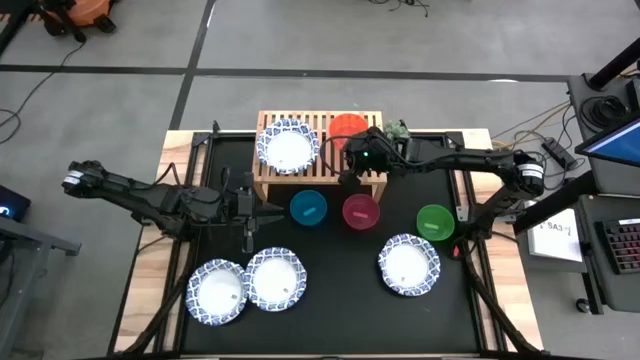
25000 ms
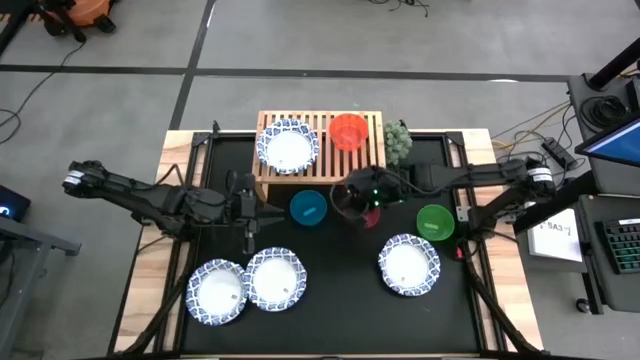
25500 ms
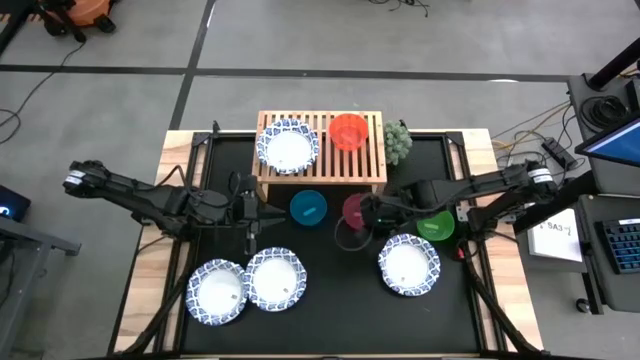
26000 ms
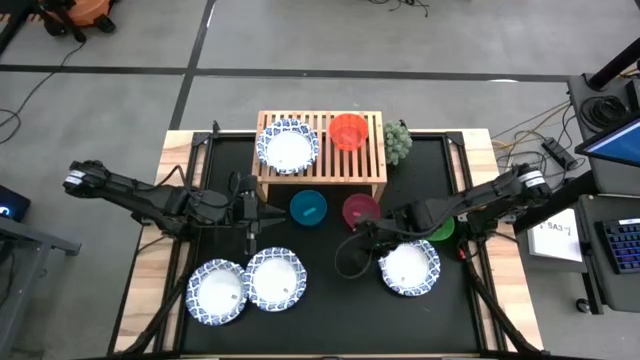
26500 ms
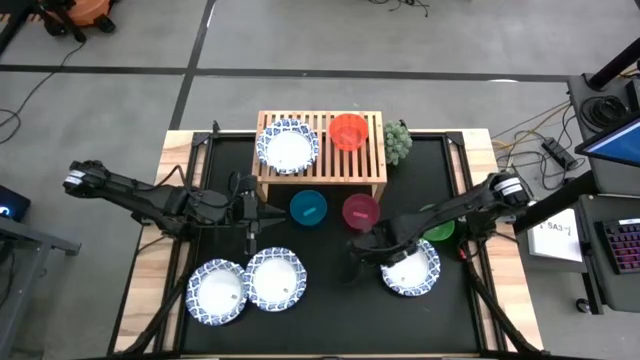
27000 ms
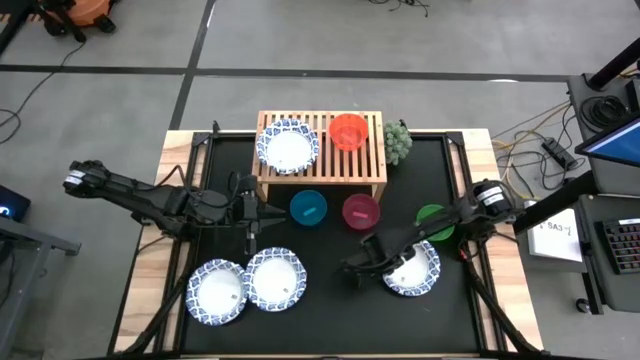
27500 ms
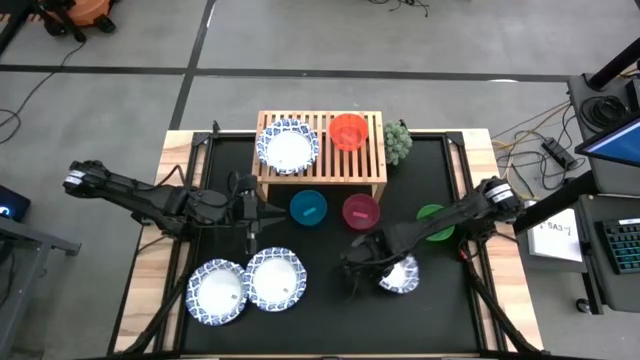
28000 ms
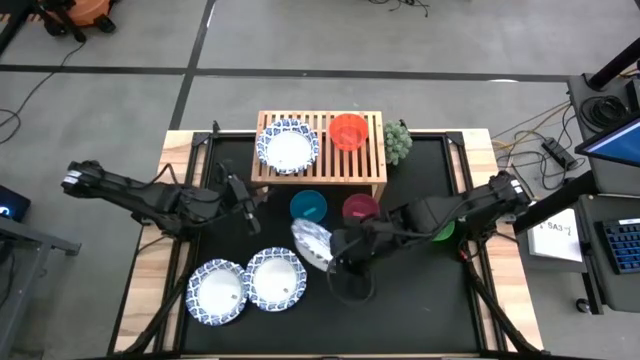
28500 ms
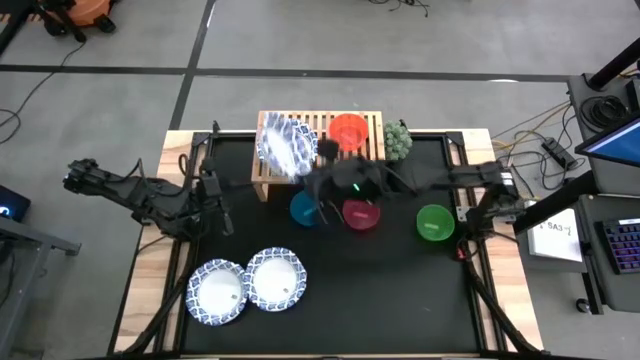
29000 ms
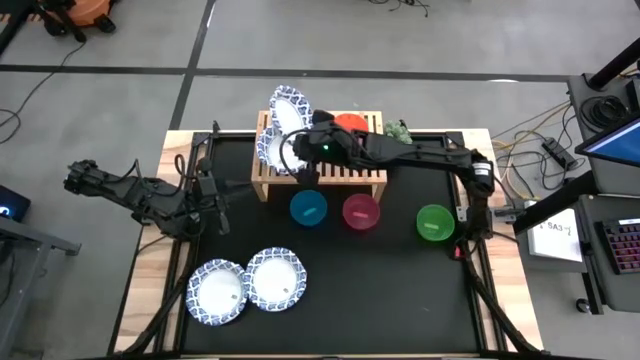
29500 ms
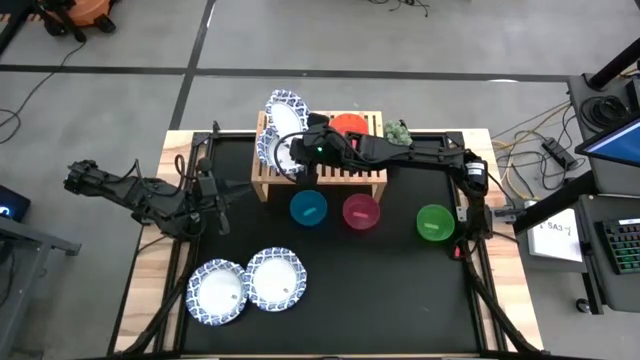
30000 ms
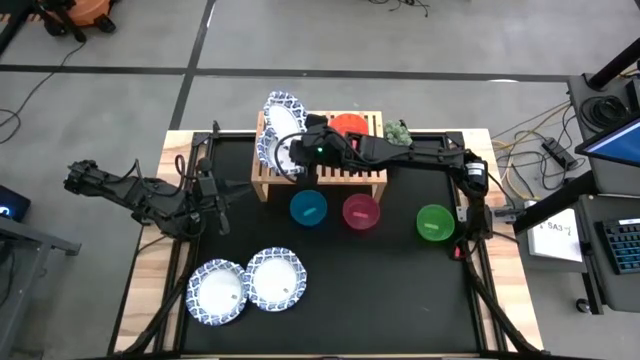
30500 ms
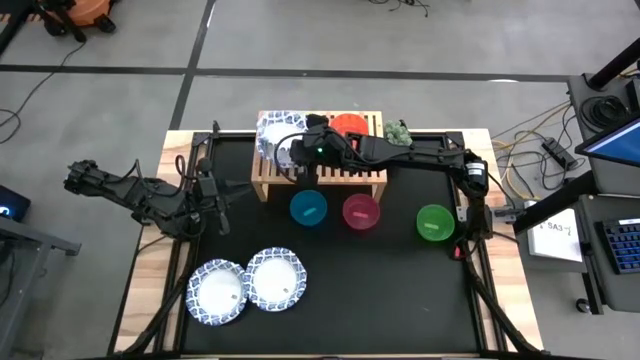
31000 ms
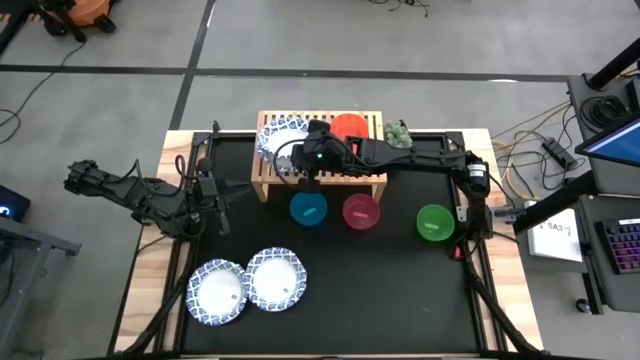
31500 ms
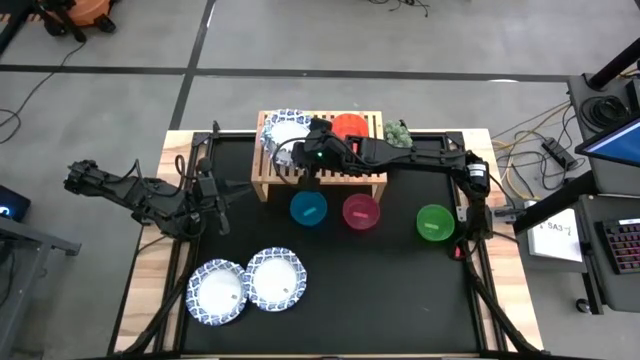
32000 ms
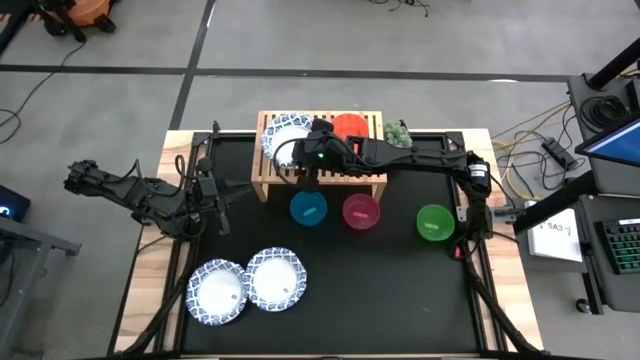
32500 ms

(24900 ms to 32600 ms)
Task: Place and stack bowls onto a shelf
Stack the white patterned bowl on top of the other white patterned bowl on the shelf

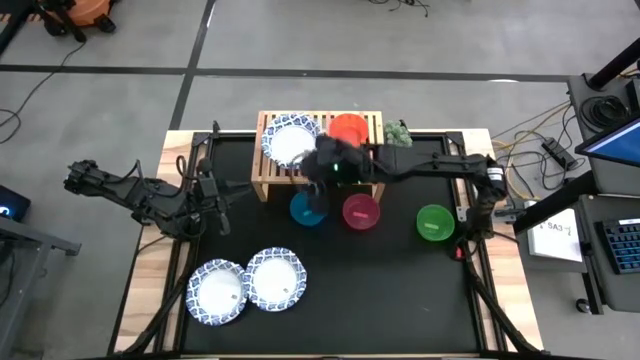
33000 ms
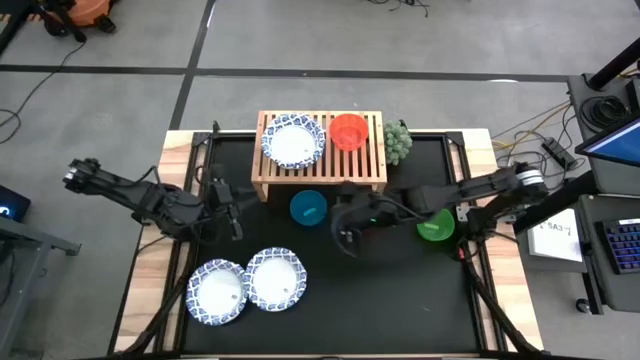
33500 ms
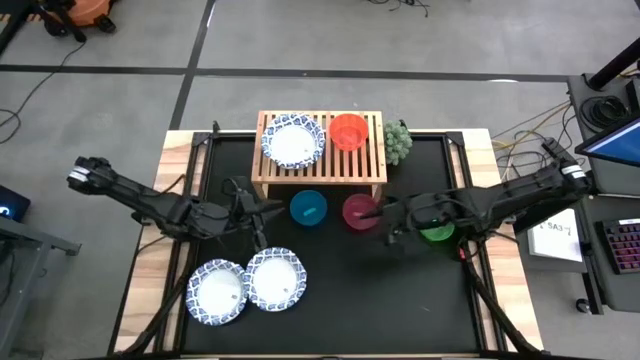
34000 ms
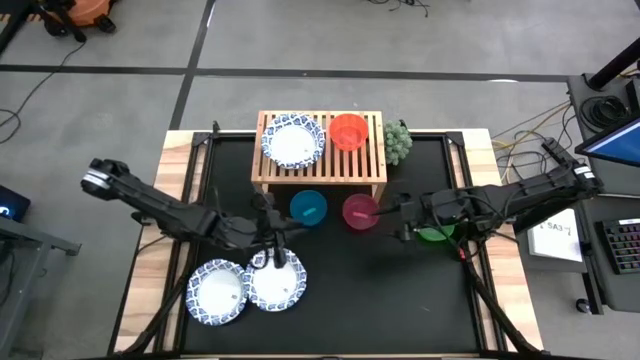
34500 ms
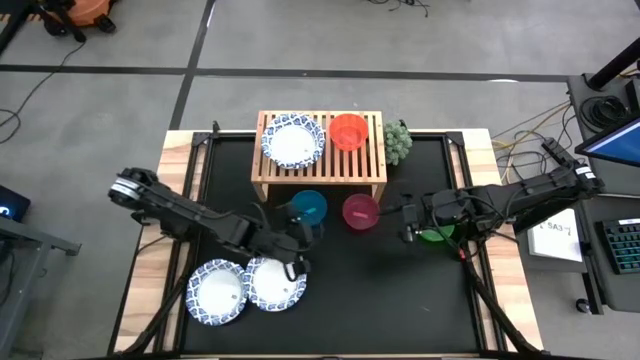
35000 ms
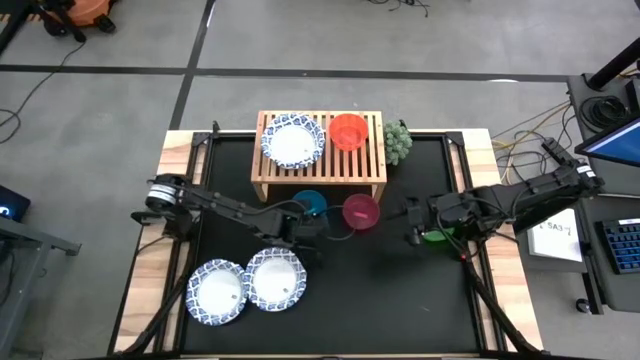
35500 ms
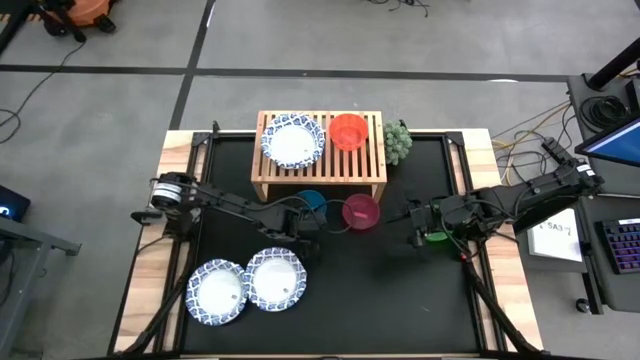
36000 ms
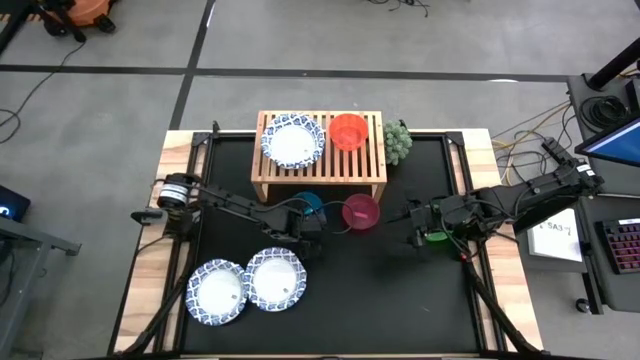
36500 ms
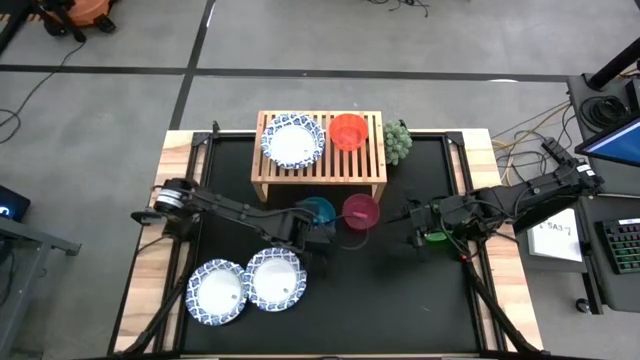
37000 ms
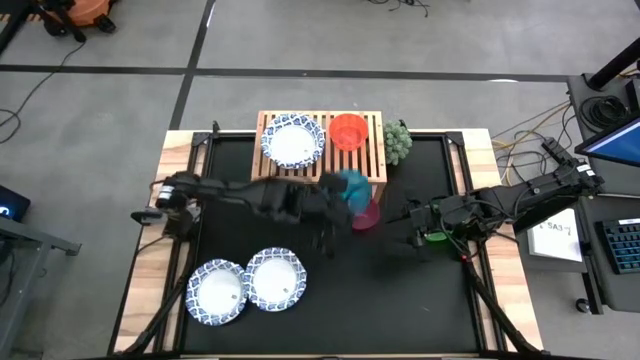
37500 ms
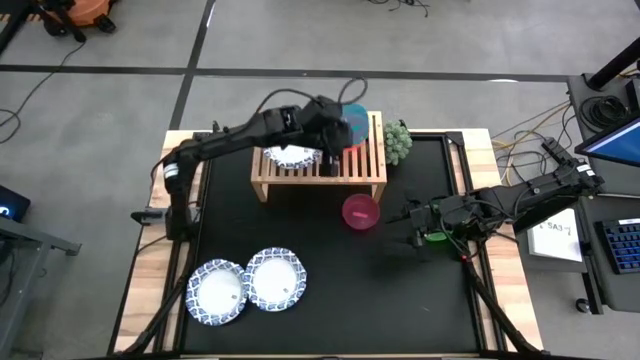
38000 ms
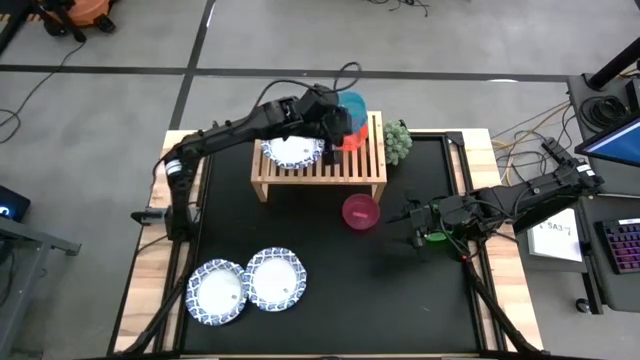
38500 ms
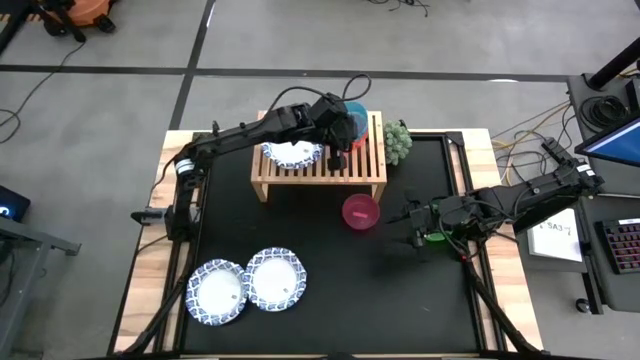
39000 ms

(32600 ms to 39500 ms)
Stack the blue bowl on top of the other orange bowl on the shelf

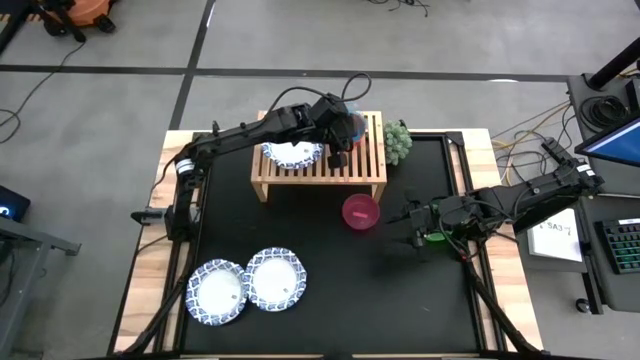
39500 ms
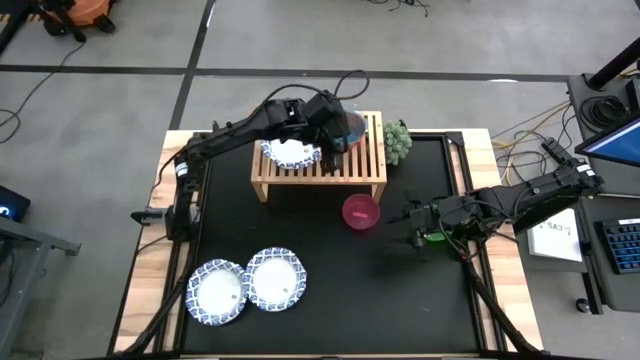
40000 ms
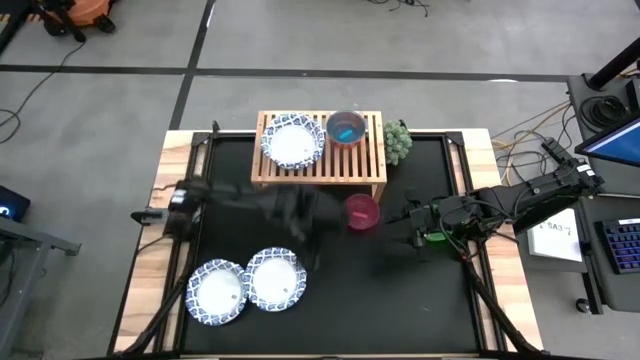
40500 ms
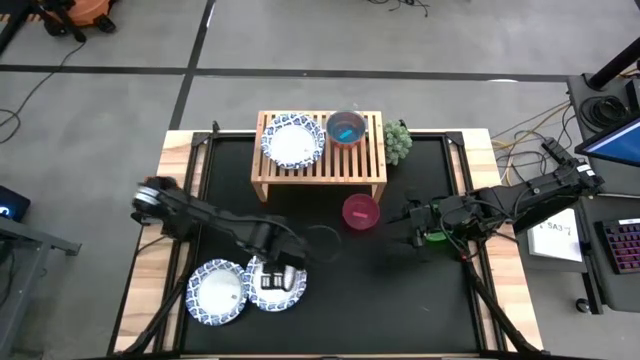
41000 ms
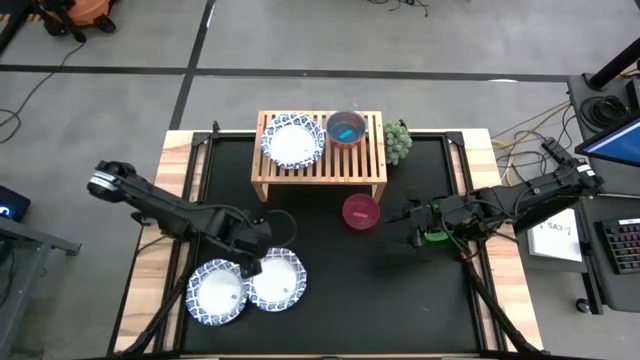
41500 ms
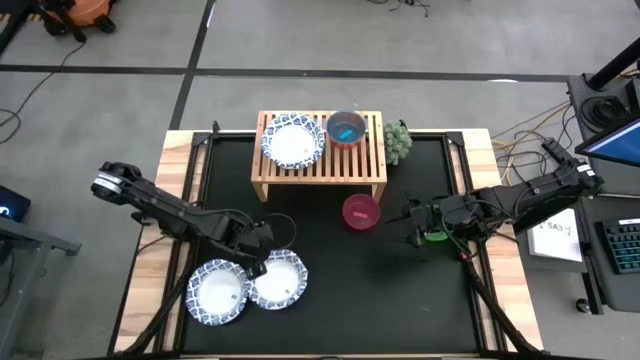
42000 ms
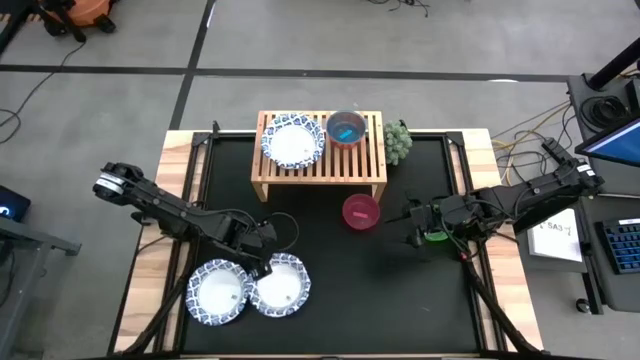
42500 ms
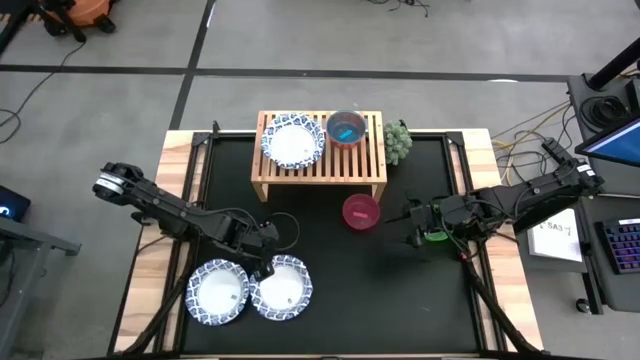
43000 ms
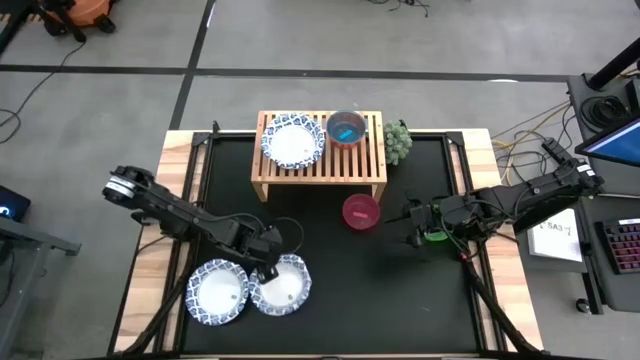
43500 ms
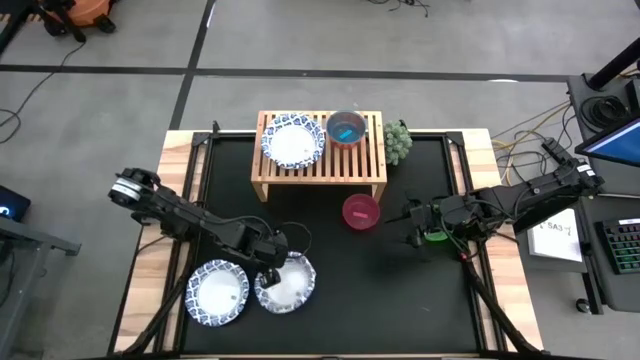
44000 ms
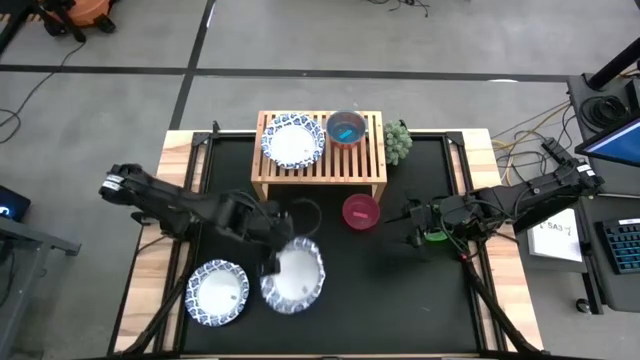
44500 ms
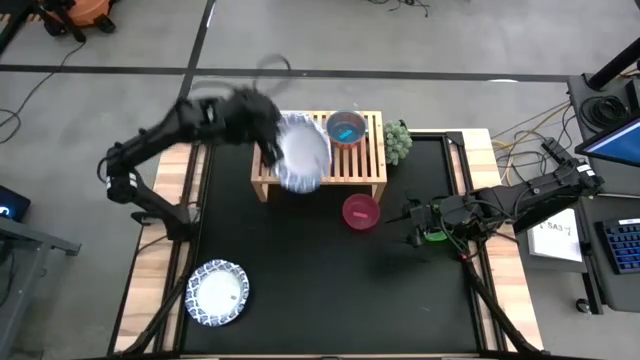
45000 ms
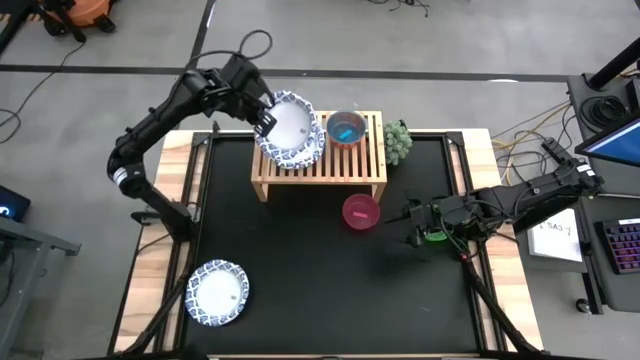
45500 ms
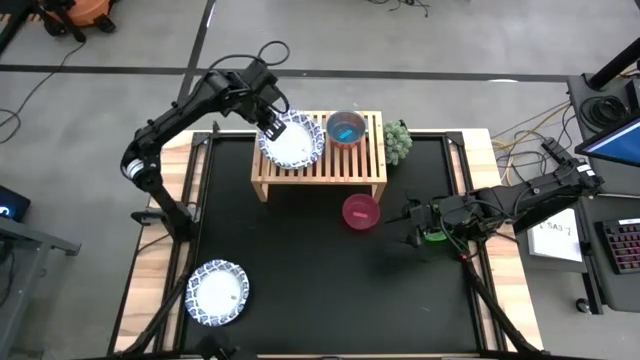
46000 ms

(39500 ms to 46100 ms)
Stack the right white patterned bowl on the other white patterned bowl on the shelf
